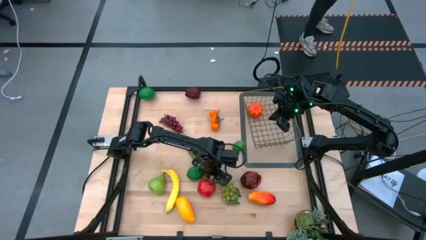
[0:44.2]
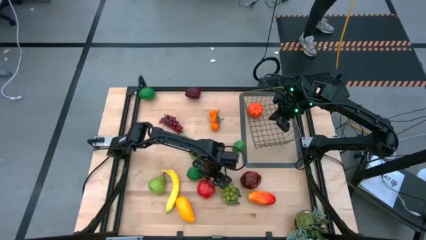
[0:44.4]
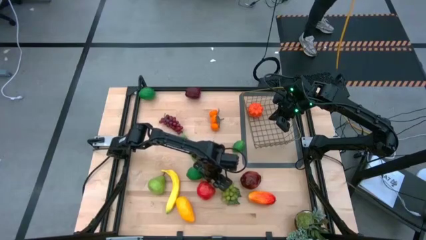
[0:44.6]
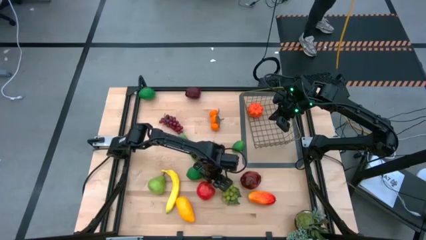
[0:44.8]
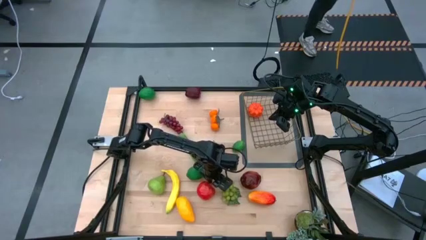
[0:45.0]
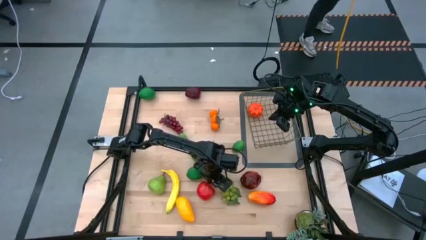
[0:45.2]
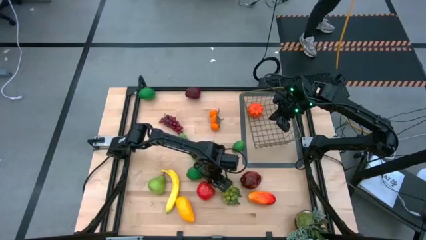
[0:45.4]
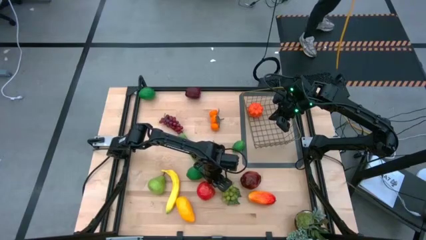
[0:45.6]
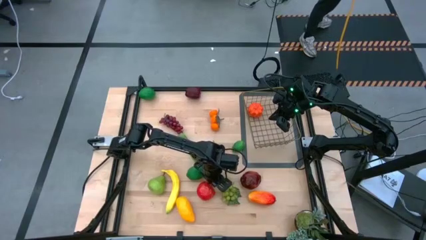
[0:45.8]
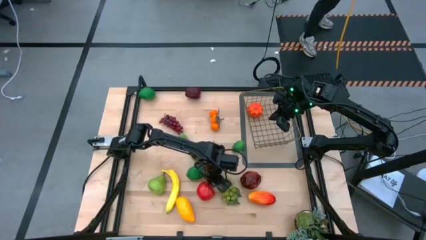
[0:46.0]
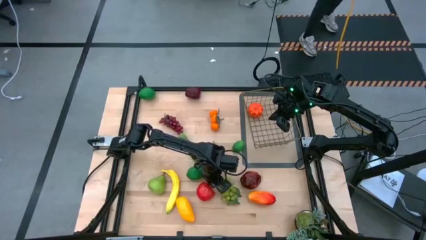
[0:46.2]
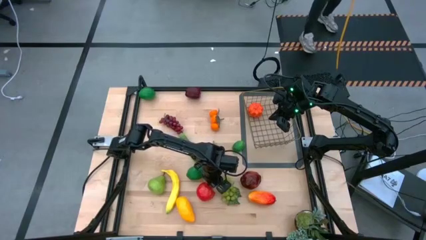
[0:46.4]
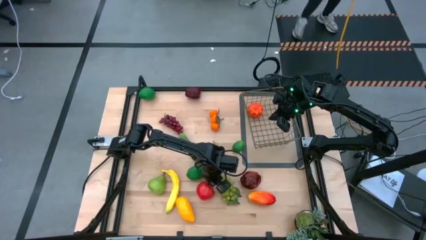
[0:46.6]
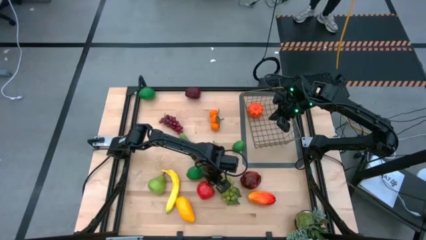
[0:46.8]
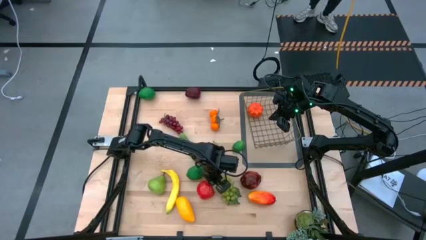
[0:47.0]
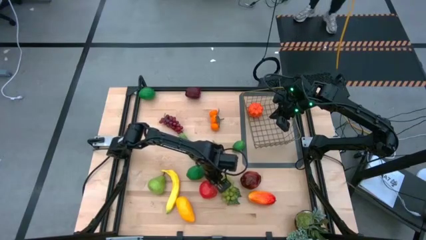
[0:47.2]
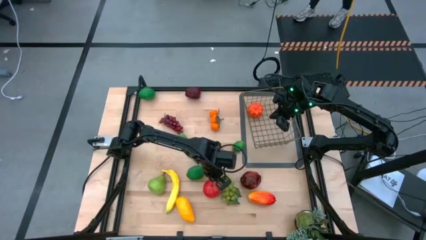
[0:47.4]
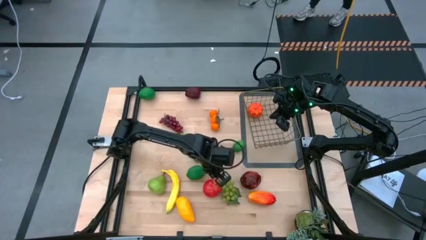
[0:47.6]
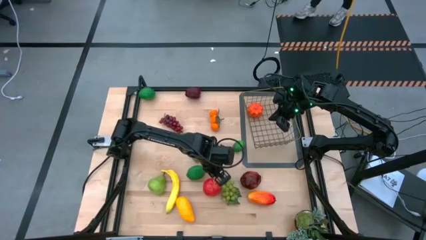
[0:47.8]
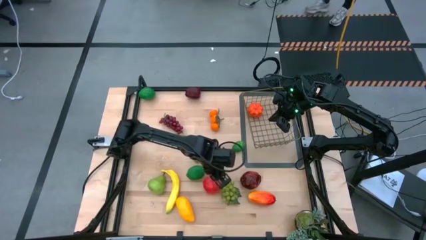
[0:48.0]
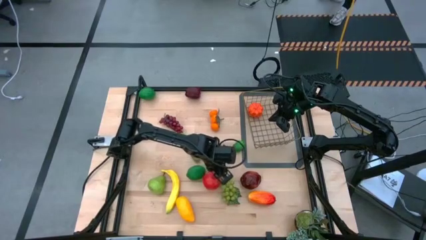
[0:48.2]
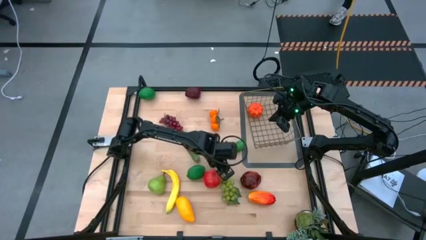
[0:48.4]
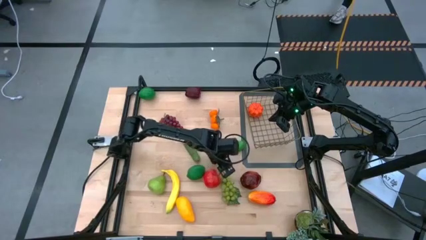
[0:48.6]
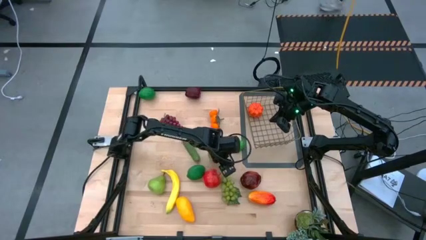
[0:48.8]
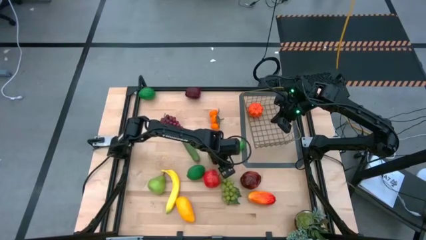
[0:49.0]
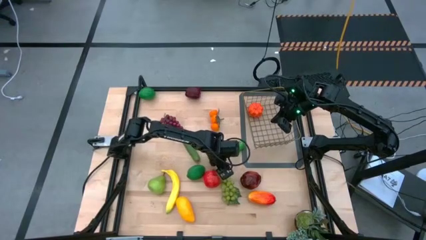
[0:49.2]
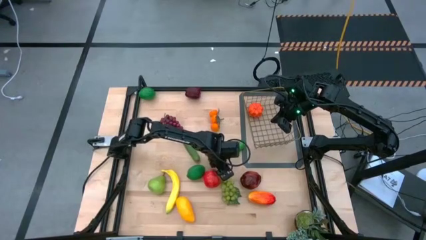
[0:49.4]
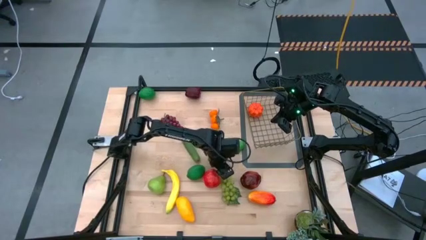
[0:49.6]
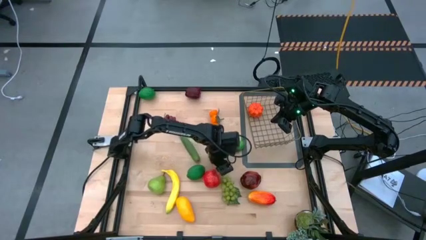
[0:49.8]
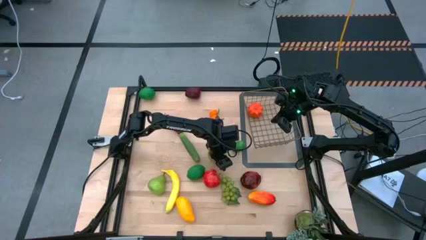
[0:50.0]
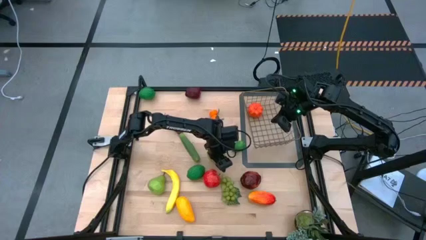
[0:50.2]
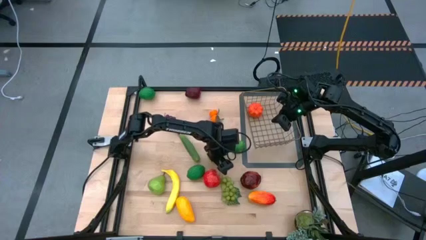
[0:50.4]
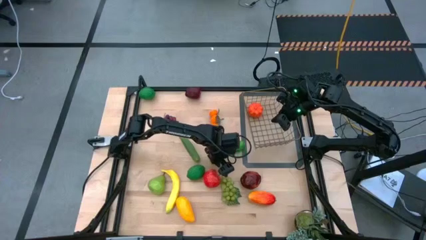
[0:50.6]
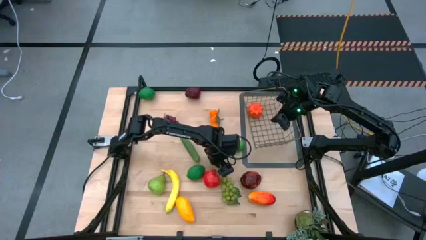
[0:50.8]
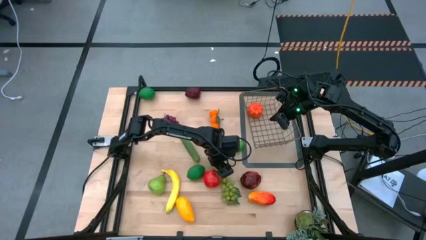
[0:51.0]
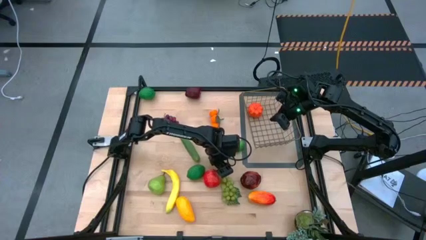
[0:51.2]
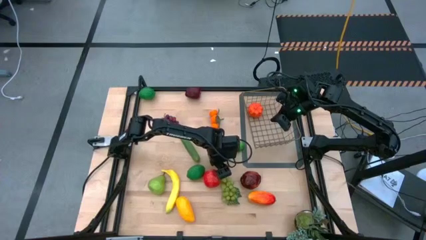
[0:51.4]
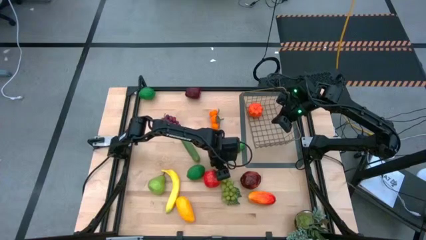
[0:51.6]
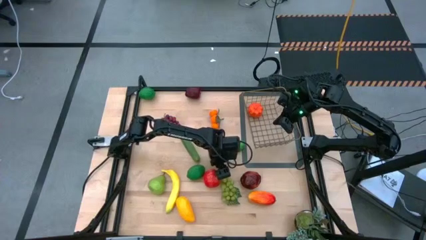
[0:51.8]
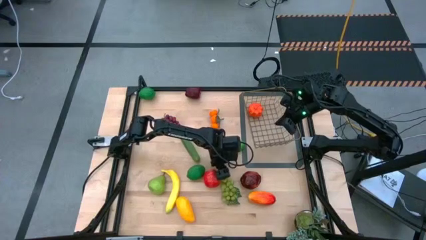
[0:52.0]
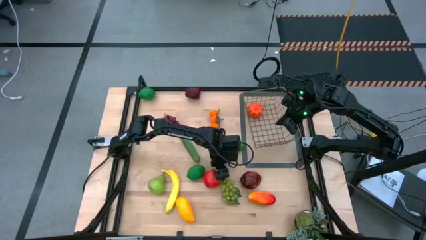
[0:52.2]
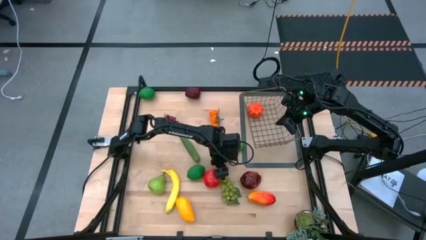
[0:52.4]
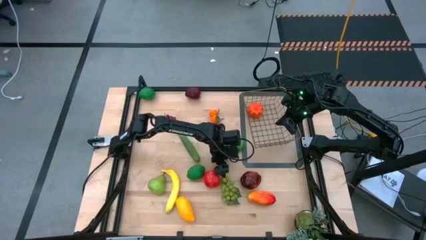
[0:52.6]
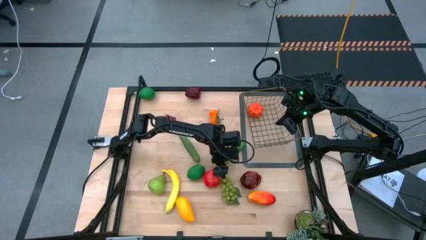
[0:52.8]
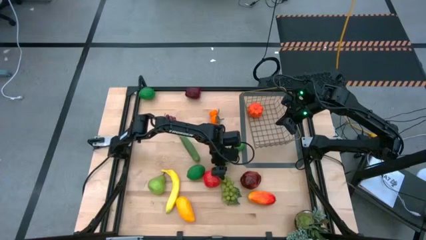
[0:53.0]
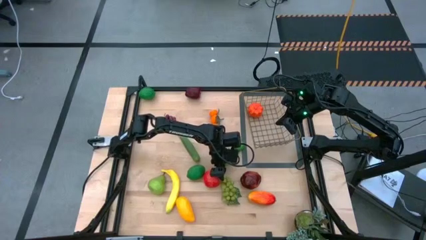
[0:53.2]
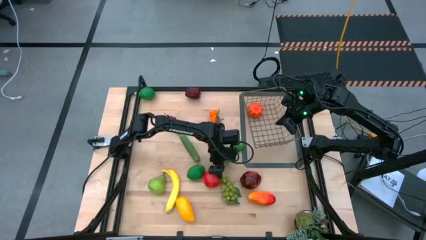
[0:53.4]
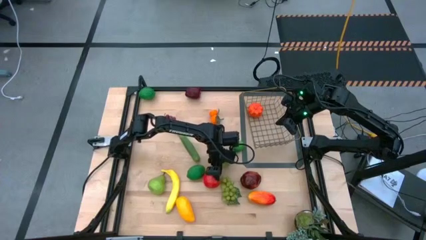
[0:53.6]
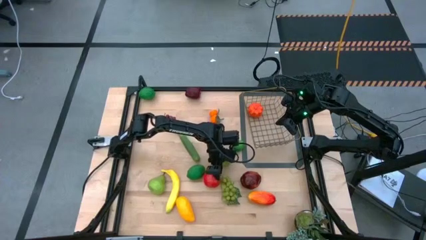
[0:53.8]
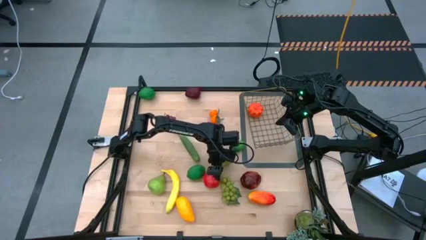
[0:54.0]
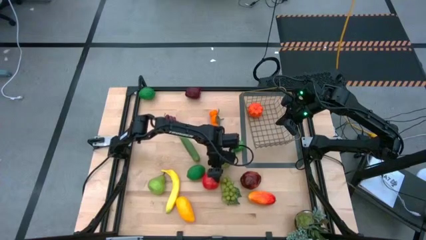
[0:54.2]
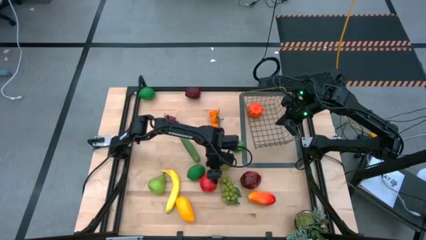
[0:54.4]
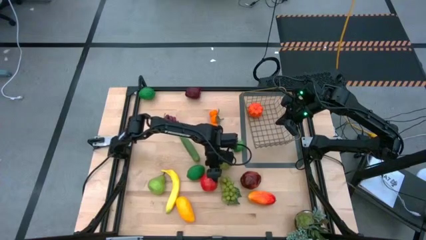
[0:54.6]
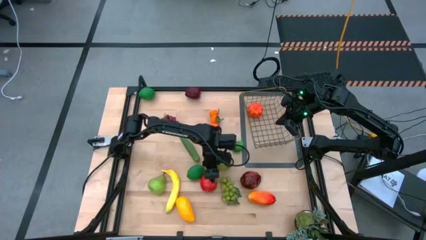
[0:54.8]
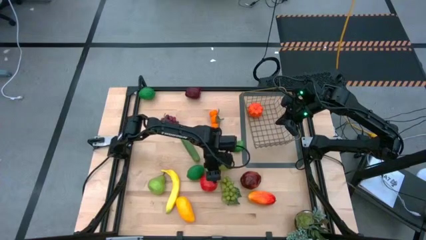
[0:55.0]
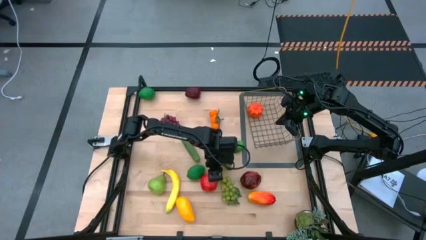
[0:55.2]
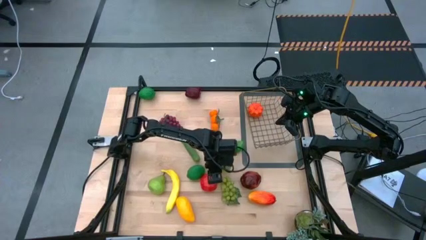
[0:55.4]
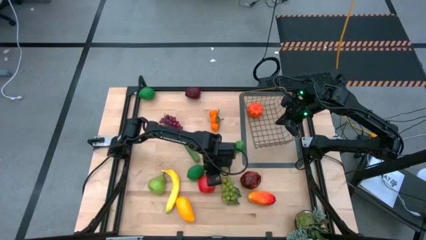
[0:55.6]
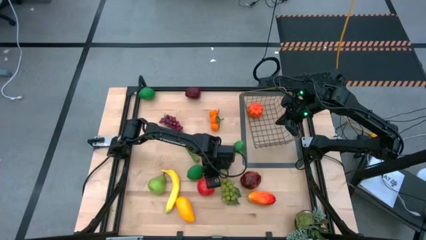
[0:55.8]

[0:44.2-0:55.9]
Task: Build produce basket
Put the light red apple into the wire basket

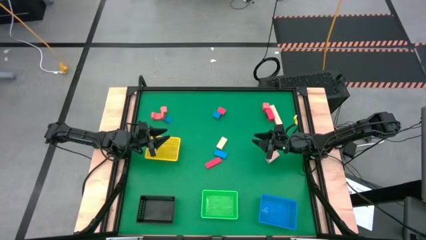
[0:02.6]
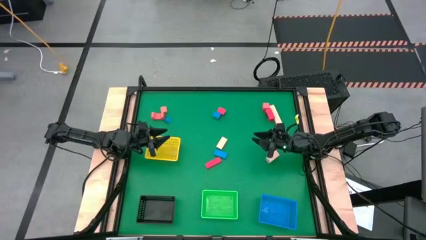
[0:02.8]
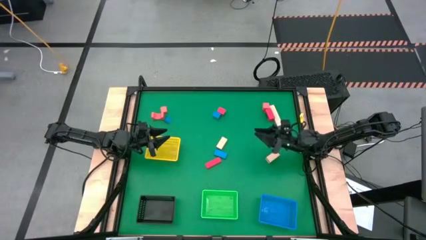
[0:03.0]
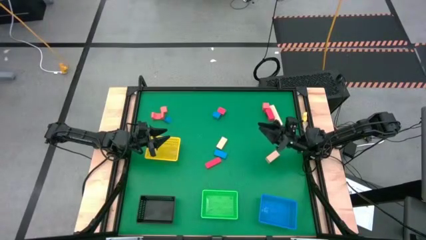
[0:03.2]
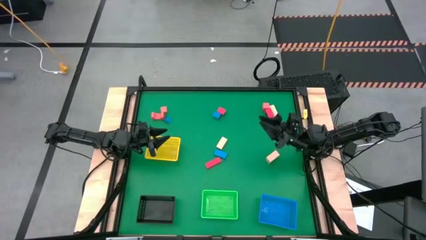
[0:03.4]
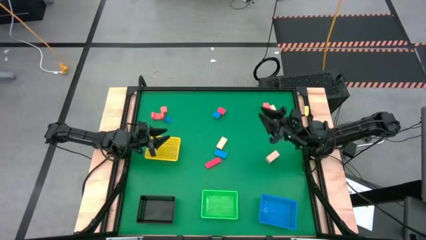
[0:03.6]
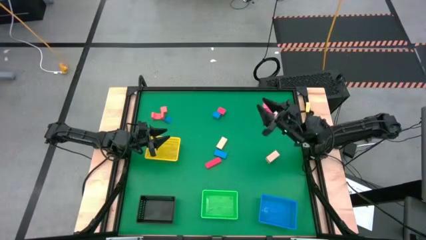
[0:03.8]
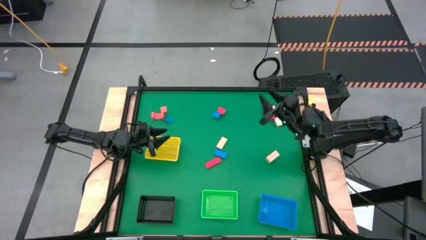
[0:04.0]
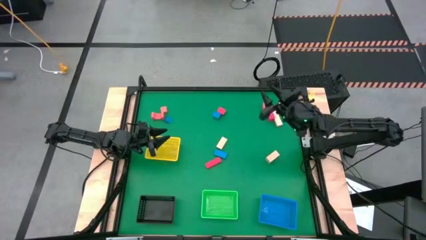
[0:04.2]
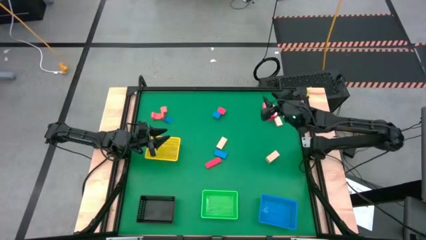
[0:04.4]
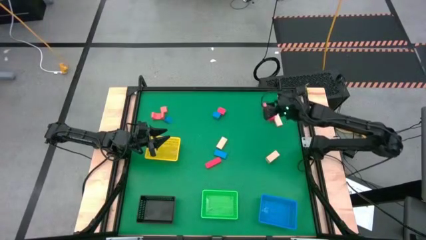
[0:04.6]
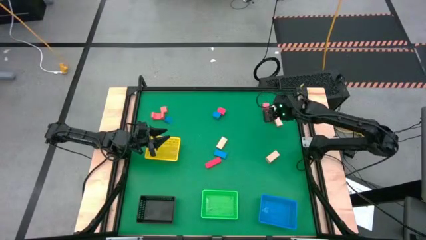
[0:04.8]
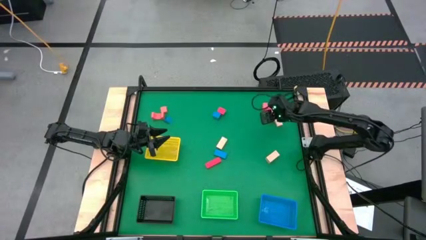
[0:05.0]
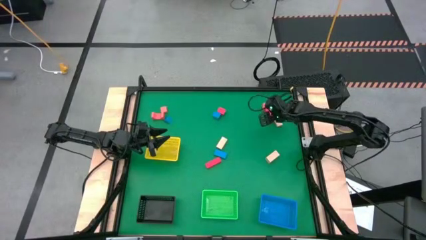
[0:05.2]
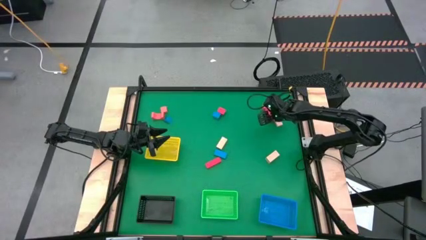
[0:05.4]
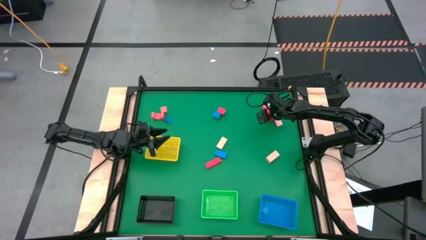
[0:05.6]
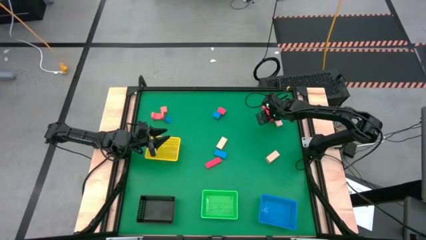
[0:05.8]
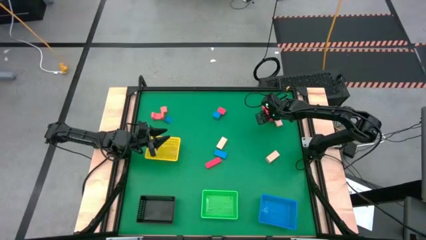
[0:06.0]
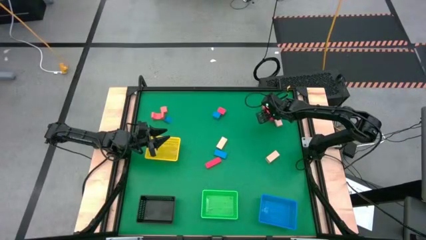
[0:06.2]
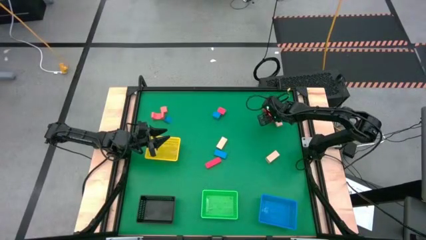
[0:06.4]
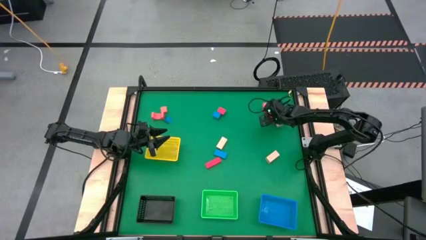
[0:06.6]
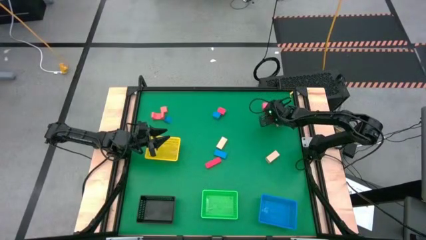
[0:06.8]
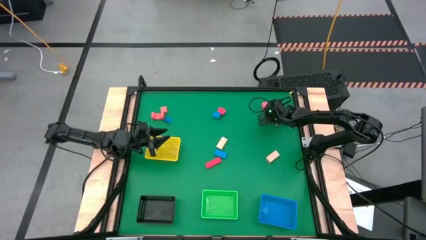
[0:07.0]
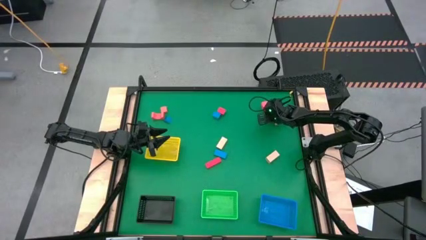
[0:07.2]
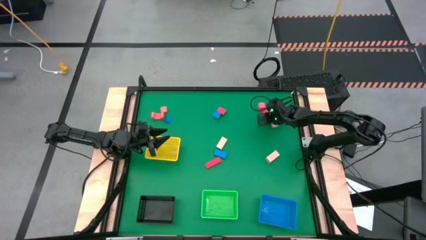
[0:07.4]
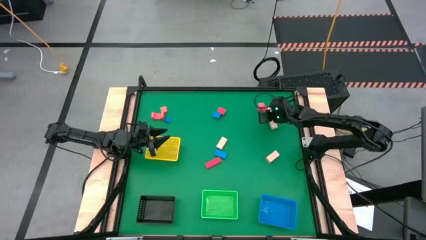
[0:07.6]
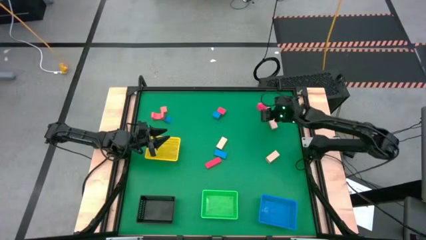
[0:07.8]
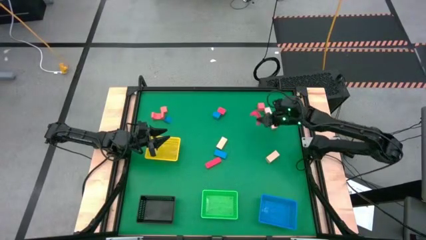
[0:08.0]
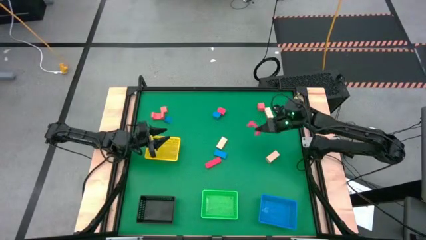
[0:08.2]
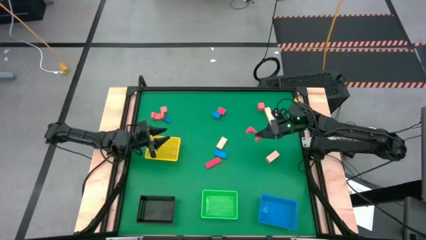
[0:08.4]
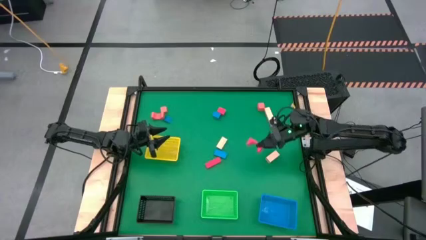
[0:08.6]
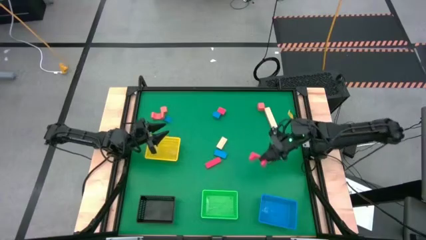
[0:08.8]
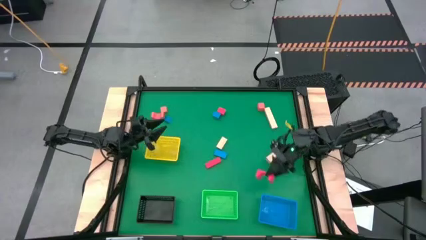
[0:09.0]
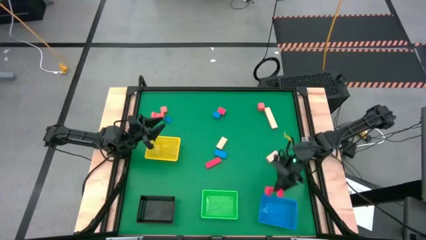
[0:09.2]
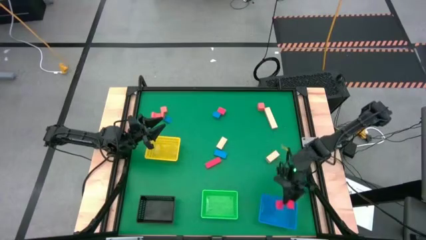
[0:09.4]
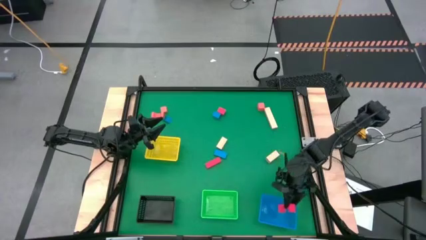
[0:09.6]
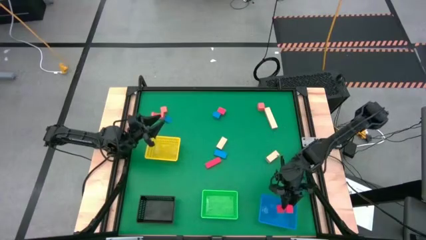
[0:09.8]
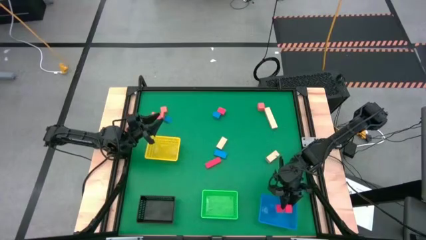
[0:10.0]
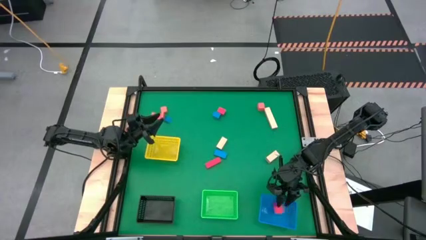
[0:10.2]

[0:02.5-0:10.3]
Task: Sort & place blocks by color
Put the red arch block into the blue bin
